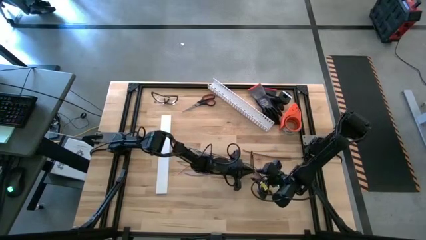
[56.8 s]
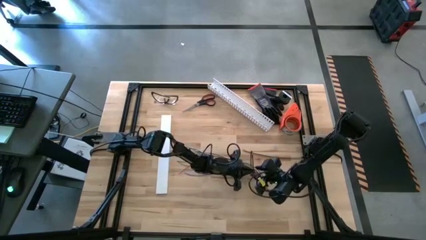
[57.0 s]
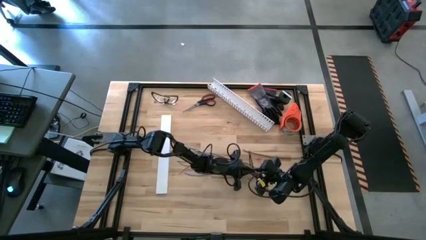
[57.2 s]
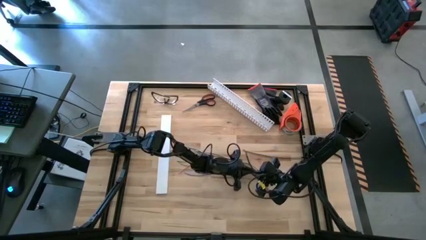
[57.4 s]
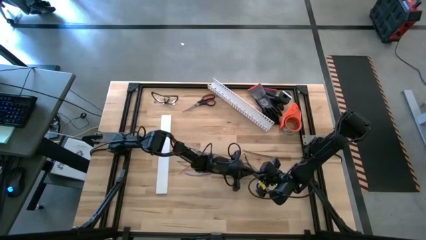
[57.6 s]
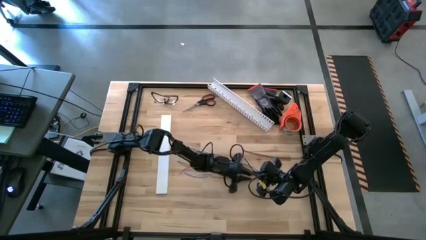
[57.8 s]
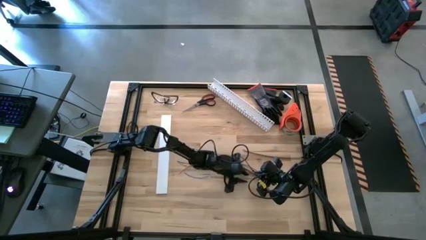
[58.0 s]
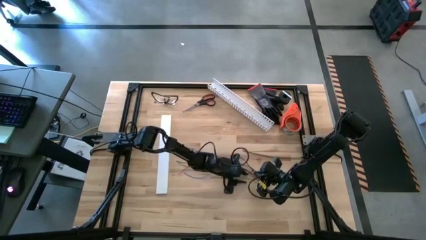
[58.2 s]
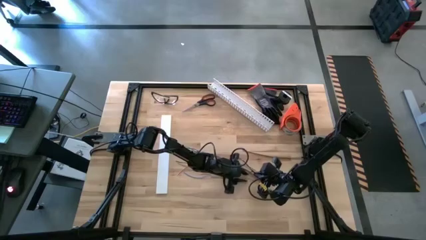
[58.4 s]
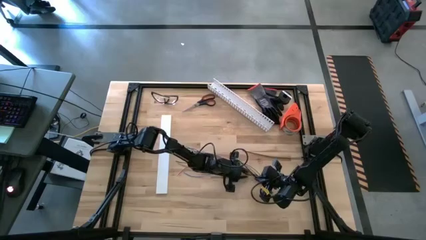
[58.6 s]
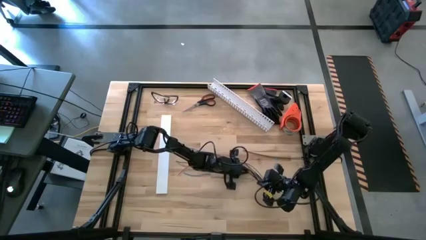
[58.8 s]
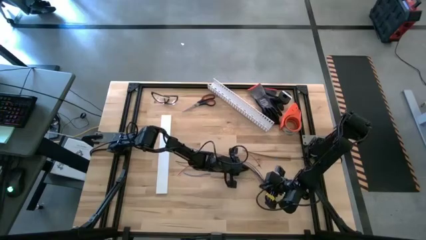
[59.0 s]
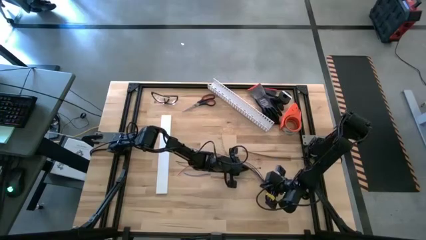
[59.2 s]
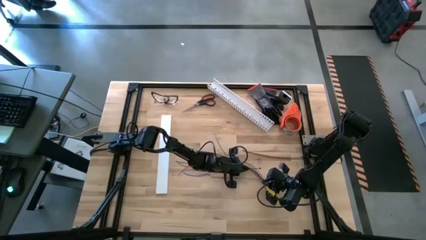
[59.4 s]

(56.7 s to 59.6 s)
Task: Ziptie cables
Wrap the bottom black zip tie on the cable wires

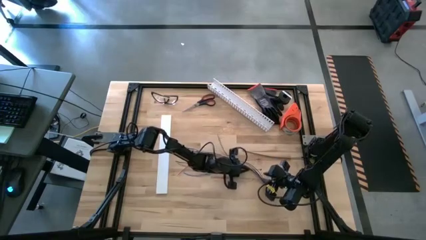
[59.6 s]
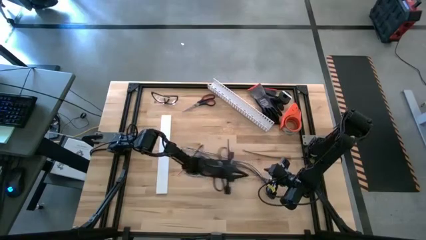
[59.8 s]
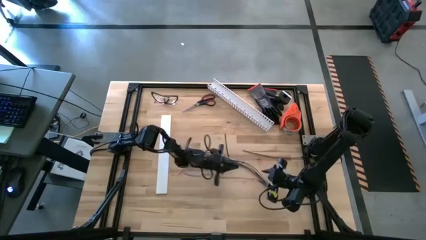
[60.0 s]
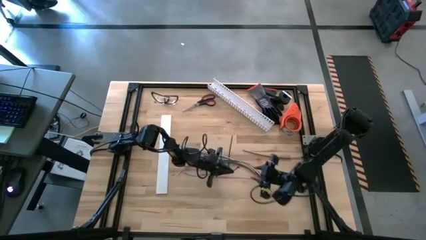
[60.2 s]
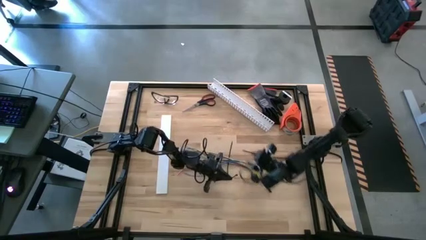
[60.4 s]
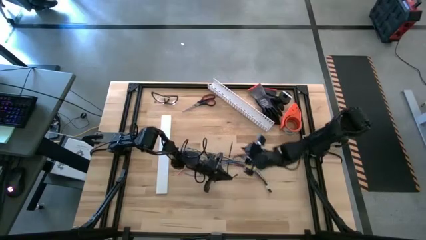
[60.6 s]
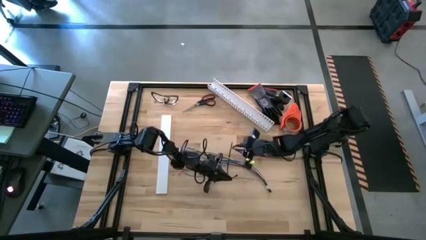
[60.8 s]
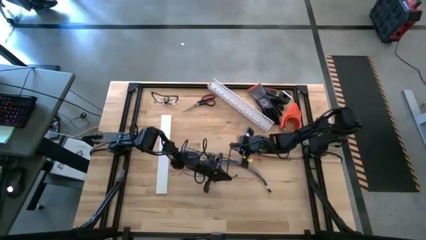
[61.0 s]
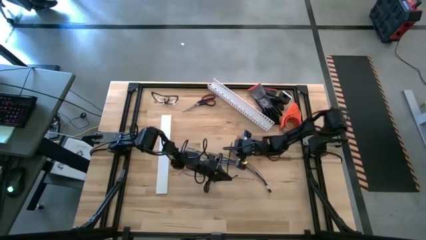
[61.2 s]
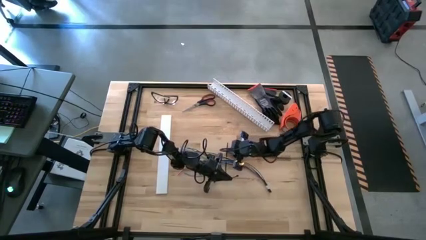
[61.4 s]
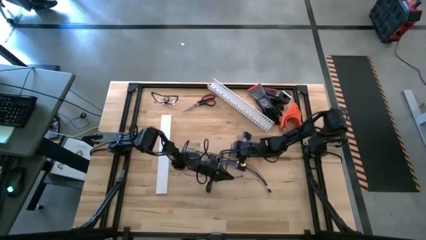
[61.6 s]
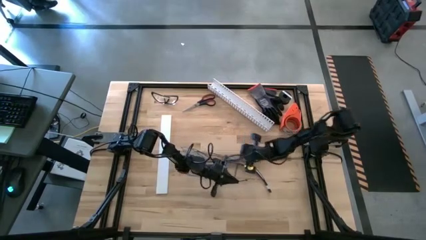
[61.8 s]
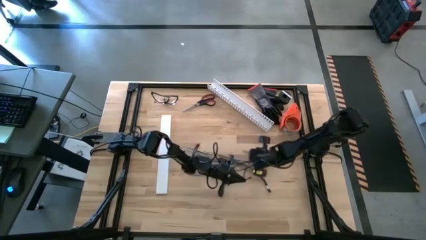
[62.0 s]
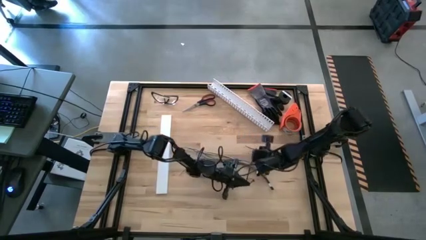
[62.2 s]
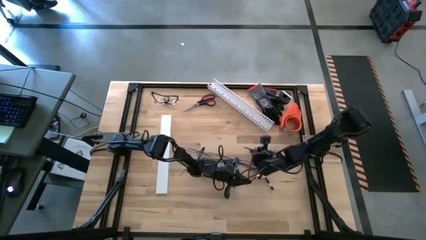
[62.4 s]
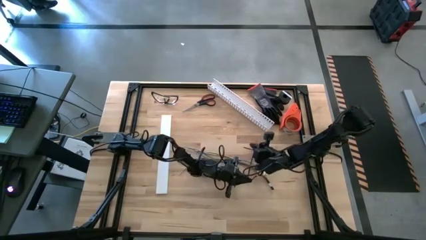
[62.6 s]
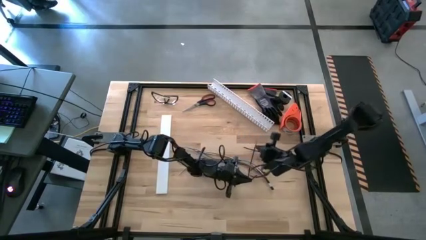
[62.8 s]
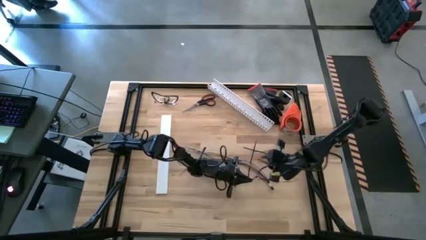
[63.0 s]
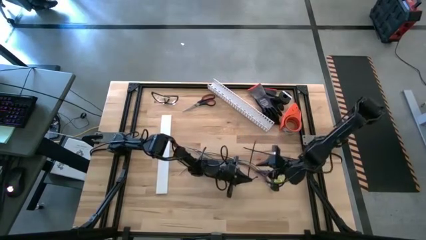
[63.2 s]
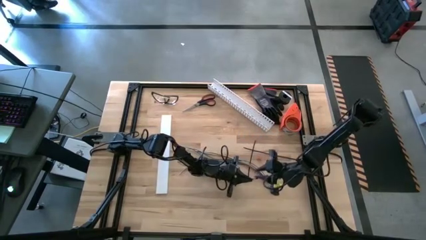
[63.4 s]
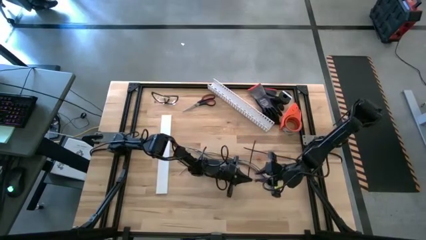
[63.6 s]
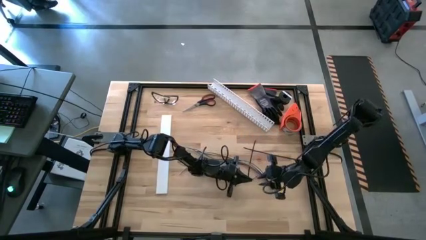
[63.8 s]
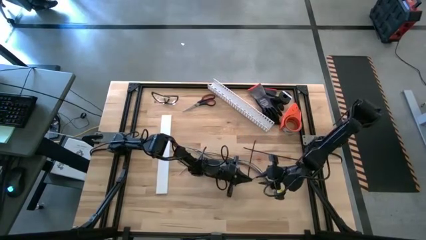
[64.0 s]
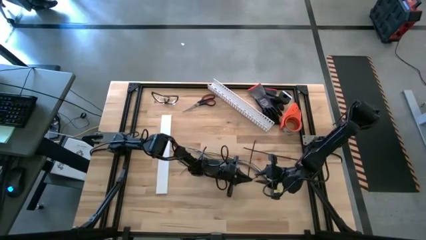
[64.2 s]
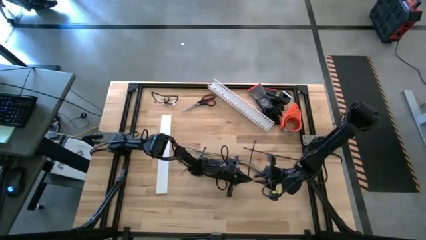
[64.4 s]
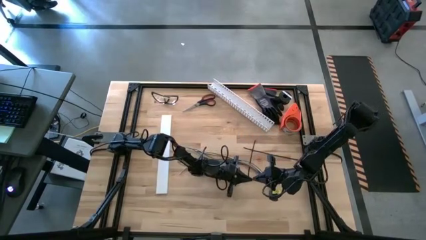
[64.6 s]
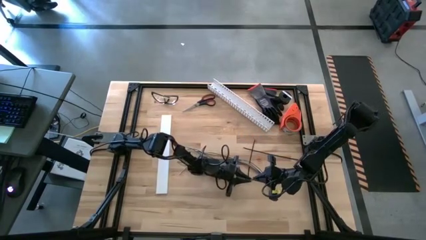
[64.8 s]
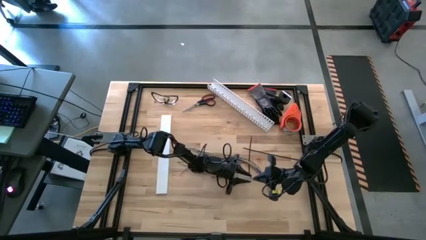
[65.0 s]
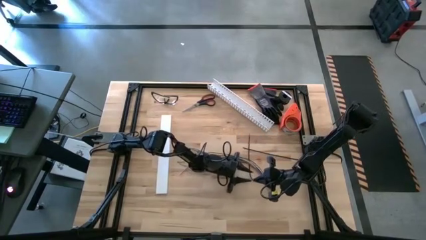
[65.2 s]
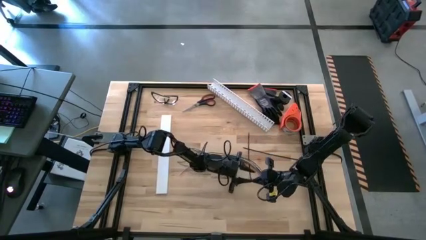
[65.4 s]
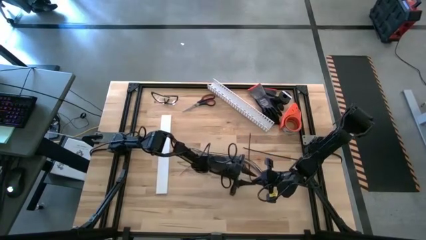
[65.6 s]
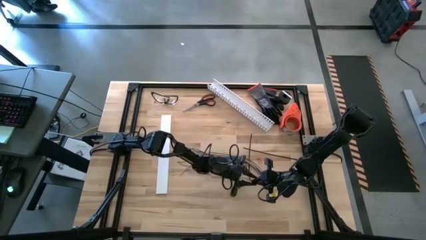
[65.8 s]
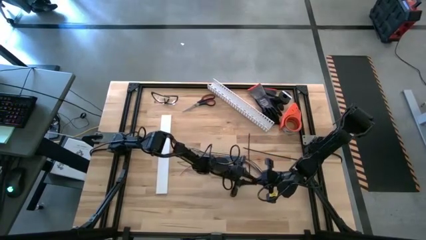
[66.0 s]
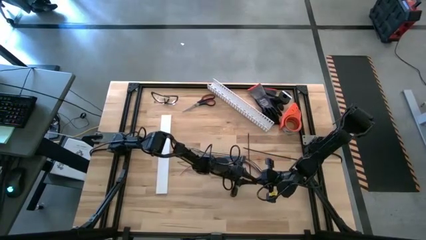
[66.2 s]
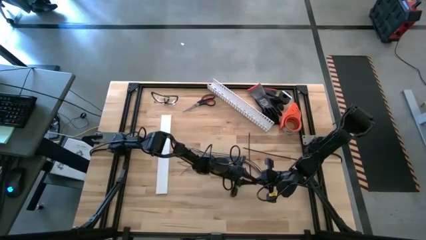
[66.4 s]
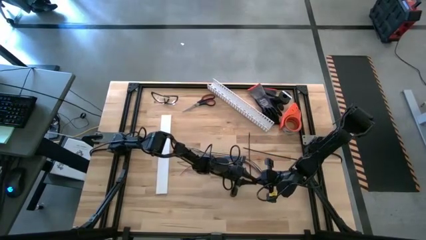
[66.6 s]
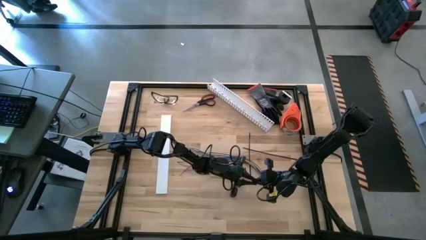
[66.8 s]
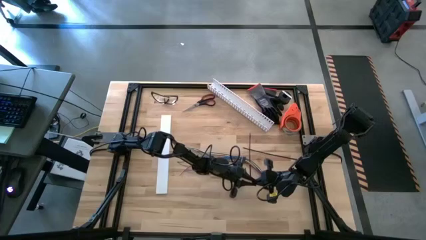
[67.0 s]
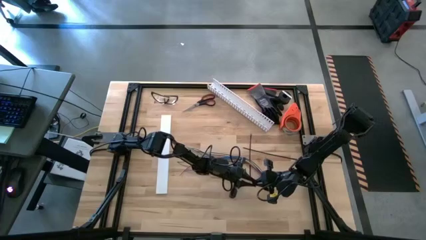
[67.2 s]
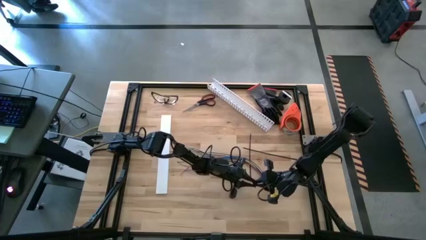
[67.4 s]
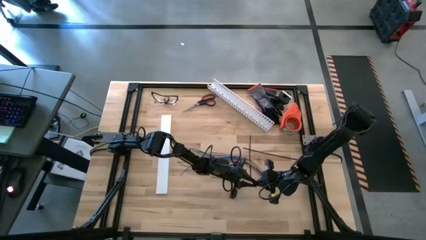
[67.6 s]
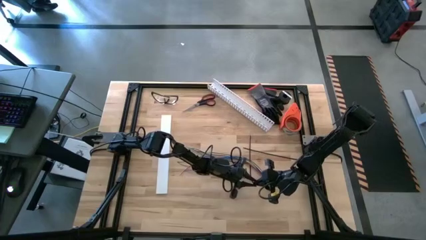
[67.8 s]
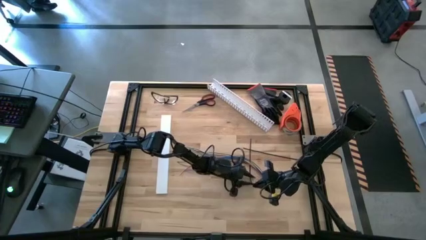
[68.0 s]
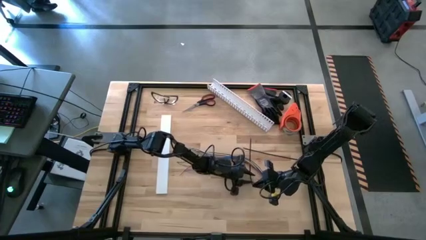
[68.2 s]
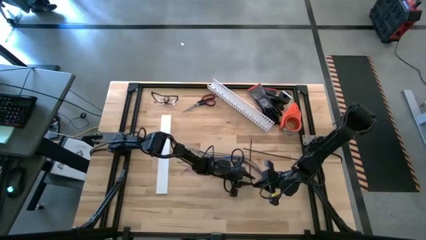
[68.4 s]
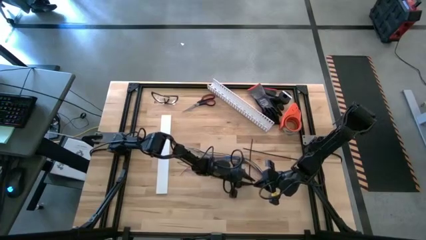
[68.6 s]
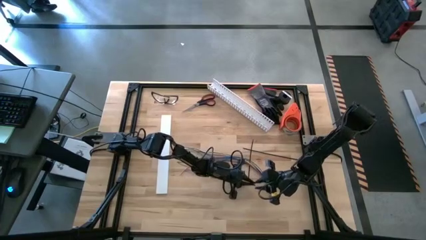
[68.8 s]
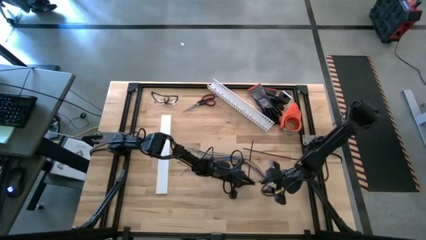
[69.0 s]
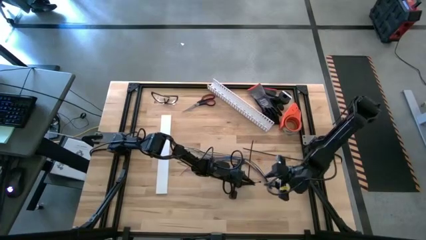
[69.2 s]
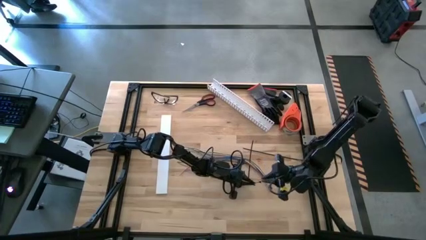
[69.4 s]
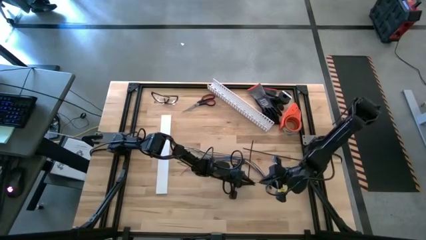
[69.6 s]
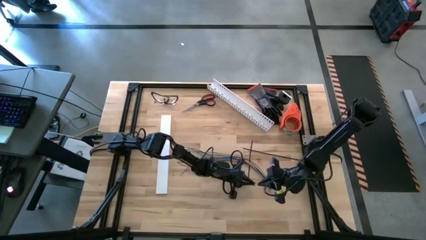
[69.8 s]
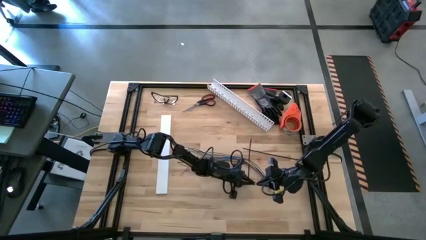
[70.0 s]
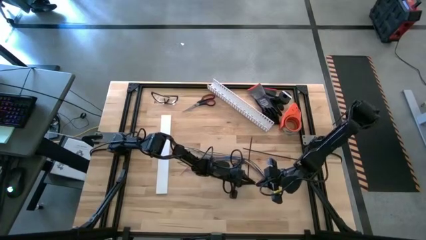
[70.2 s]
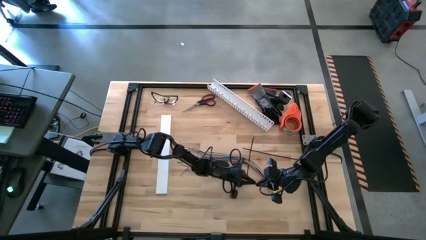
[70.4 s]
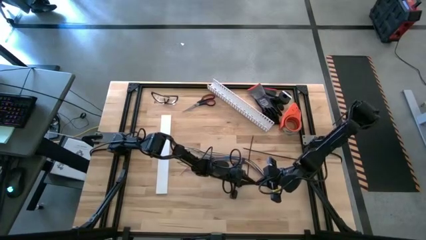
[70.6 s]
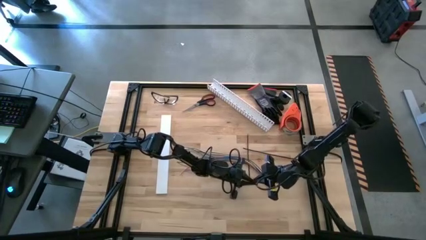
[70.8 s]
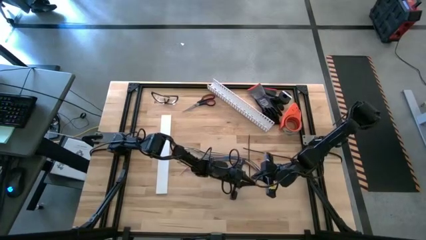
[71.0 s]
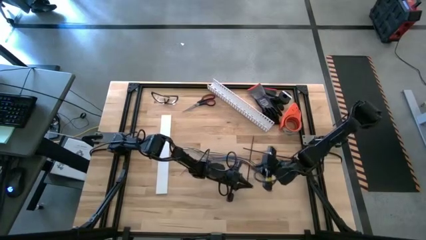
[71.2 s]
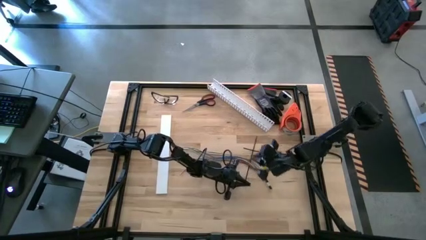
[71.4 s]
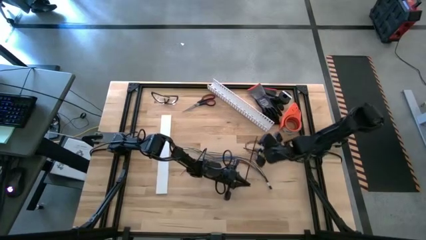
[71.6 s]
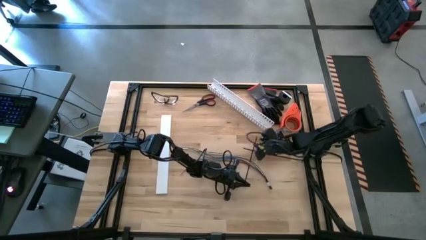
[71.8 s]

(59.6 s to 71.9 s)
Wrap the bottom black zip tie on the cable wires

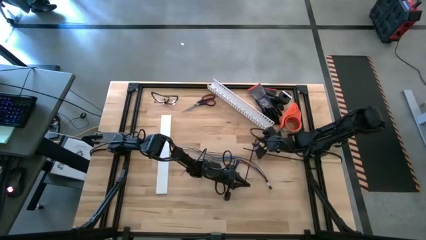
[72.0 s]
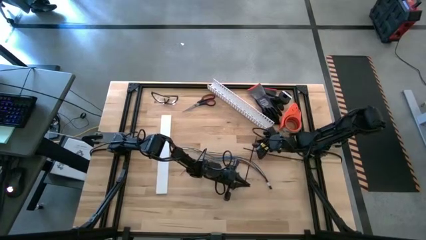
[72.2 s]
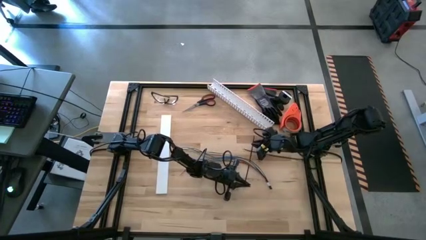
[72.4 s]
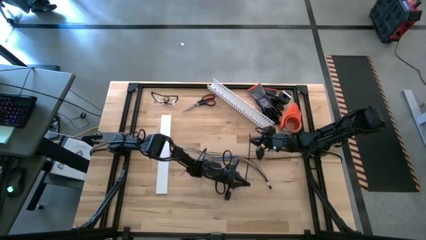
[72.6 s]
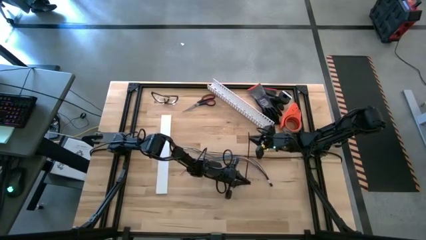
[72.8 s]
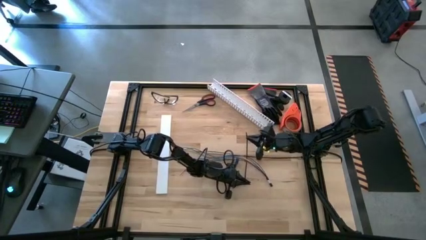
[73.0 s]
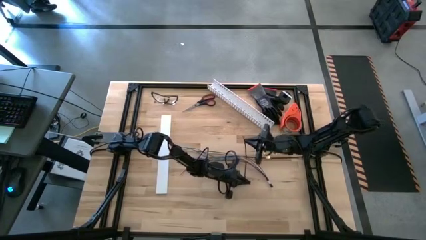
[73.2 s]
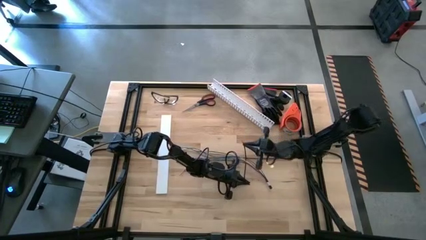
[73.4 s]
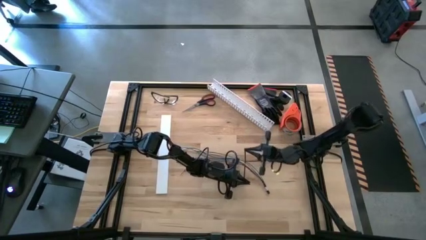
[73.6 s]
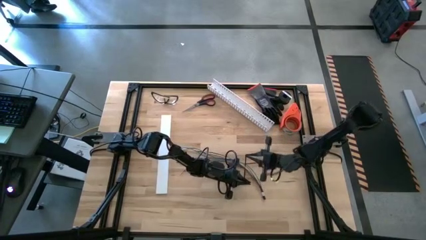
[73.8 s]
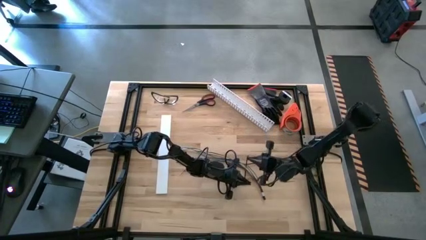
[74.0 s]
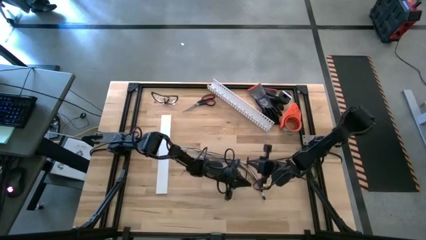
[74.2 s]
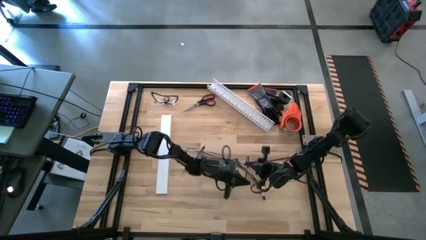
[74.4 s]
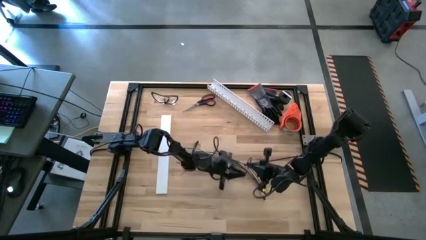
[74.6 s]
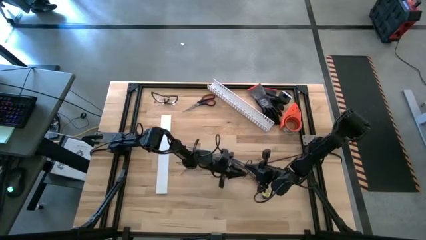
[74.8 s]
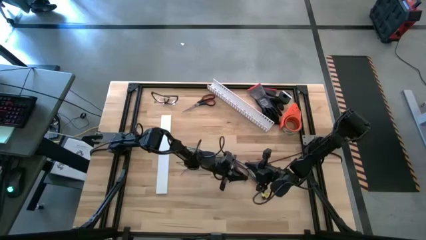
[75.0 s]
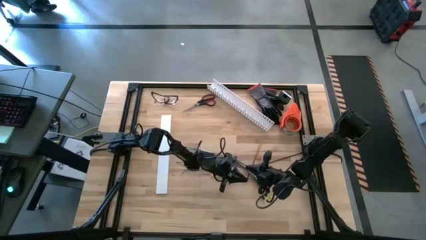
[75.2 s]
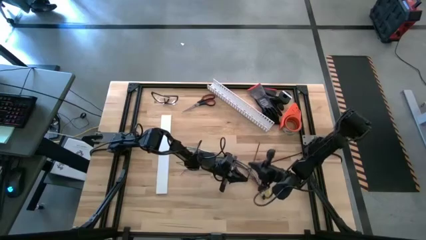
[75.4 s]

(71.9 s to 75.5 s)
Wrap the bottom black zip tie on the cable wires
